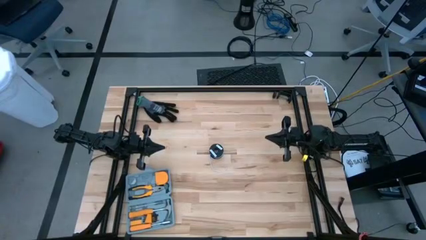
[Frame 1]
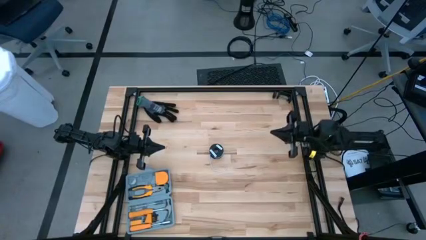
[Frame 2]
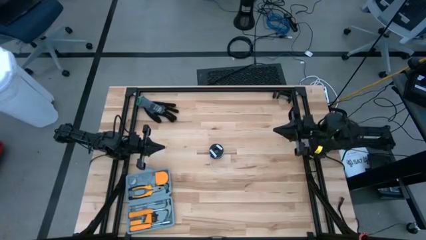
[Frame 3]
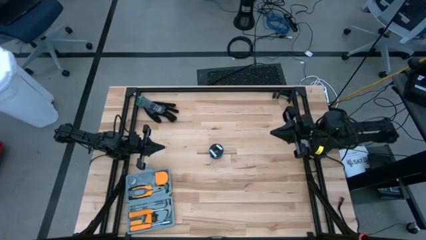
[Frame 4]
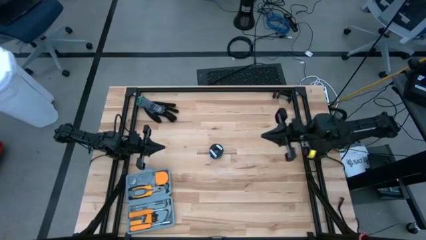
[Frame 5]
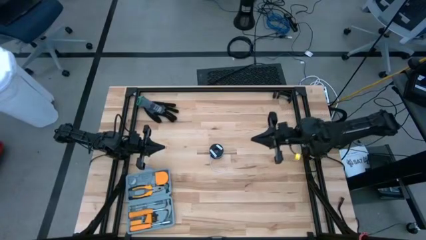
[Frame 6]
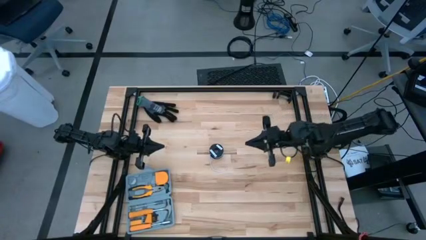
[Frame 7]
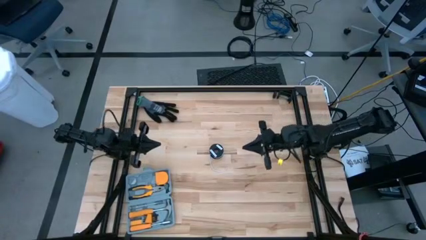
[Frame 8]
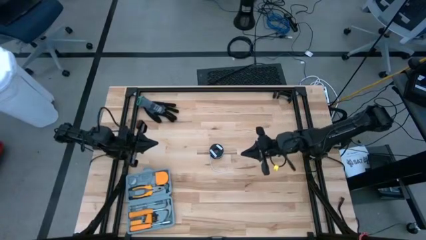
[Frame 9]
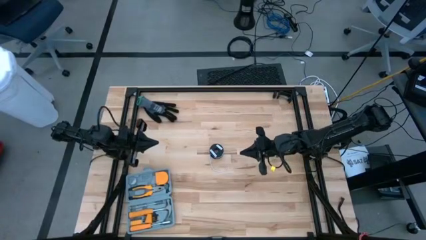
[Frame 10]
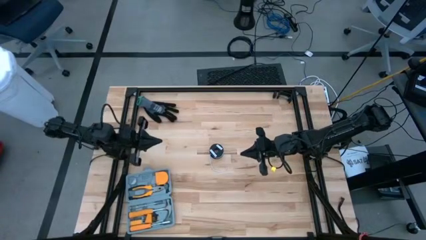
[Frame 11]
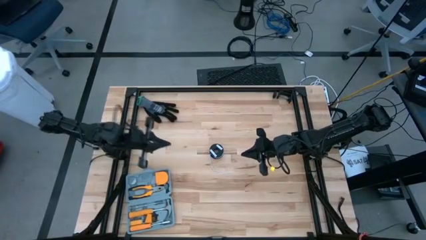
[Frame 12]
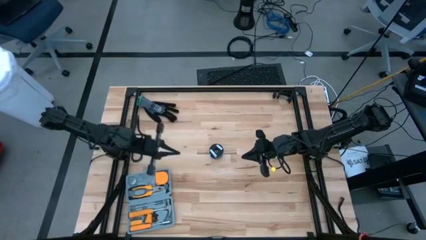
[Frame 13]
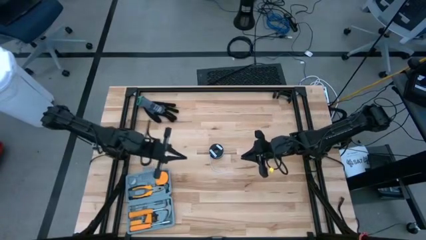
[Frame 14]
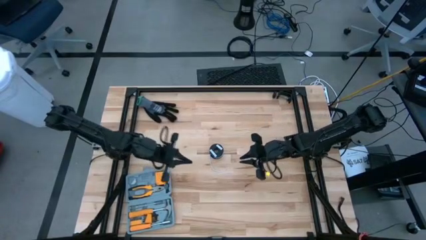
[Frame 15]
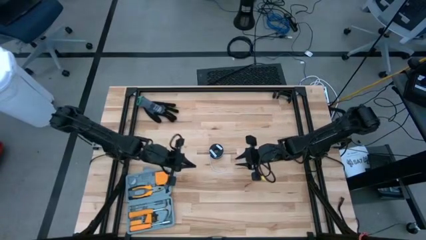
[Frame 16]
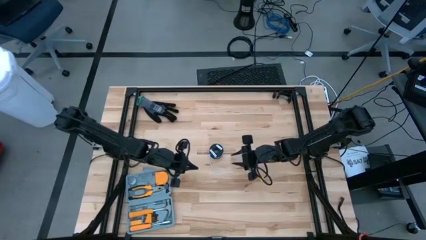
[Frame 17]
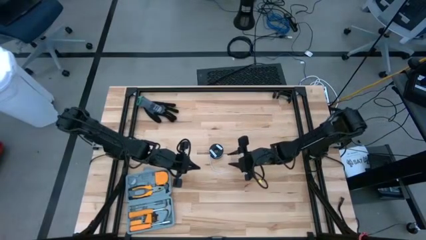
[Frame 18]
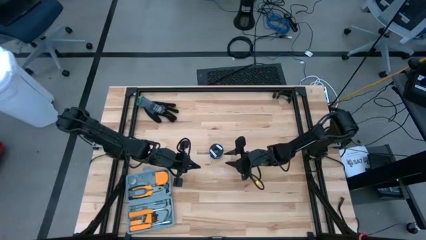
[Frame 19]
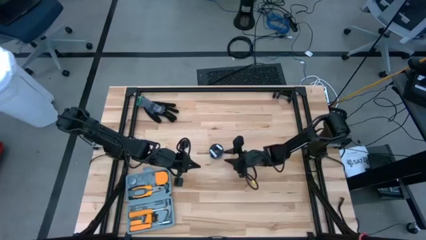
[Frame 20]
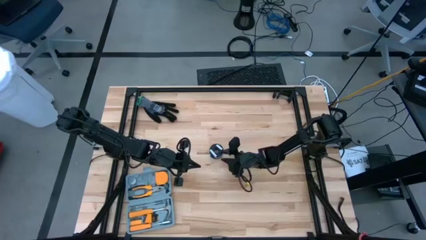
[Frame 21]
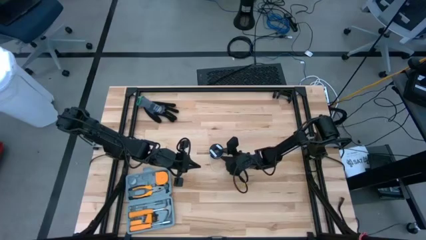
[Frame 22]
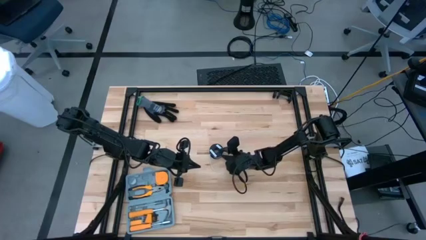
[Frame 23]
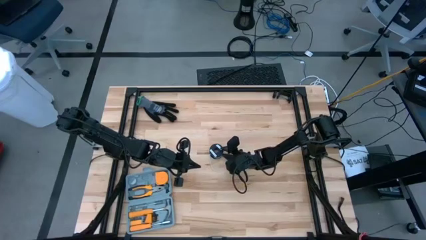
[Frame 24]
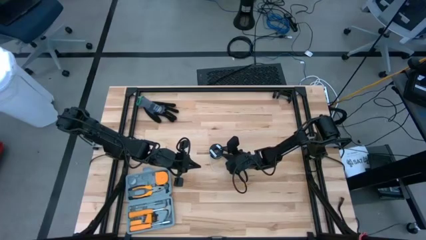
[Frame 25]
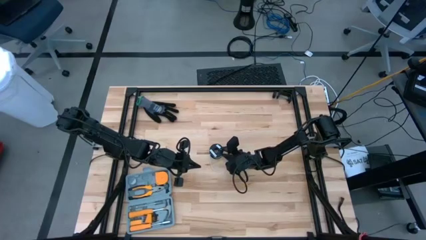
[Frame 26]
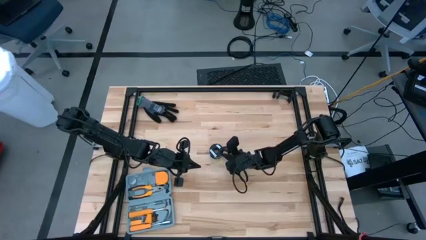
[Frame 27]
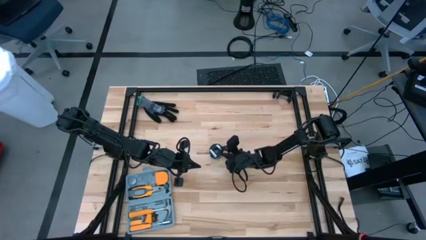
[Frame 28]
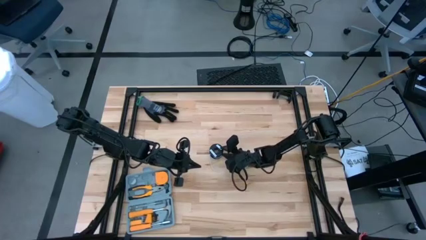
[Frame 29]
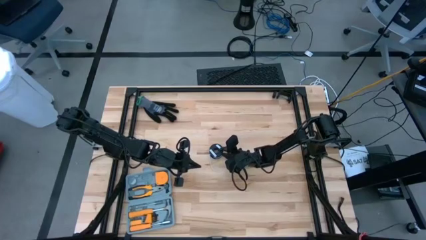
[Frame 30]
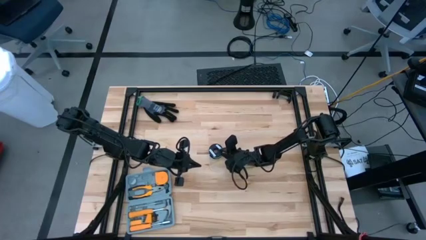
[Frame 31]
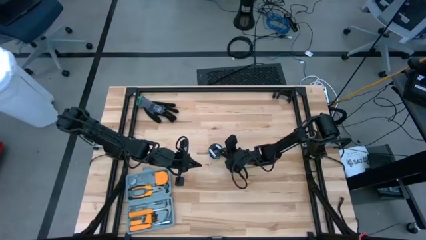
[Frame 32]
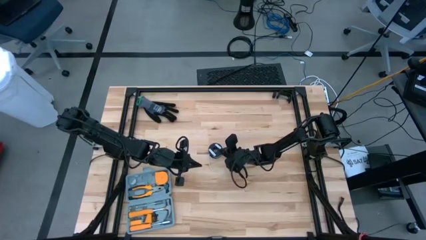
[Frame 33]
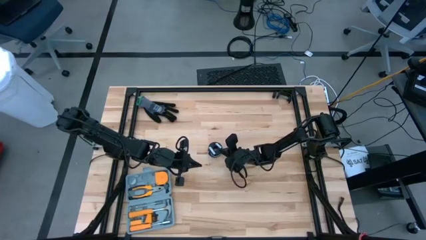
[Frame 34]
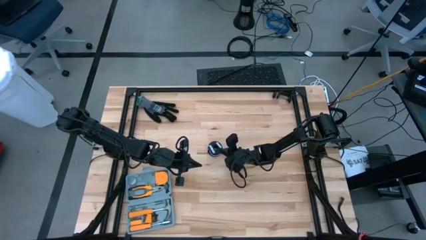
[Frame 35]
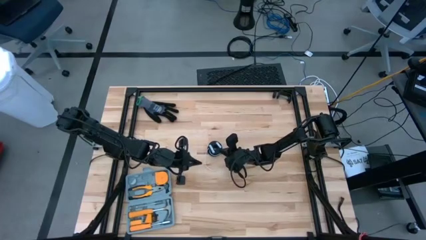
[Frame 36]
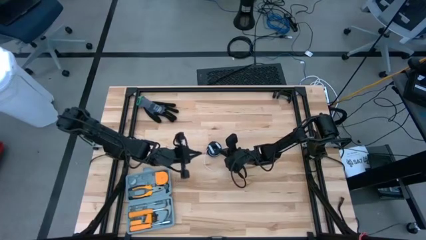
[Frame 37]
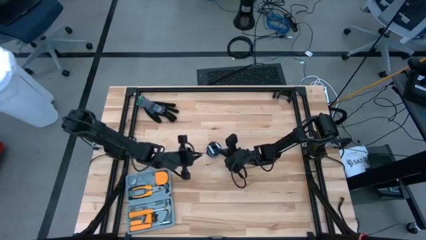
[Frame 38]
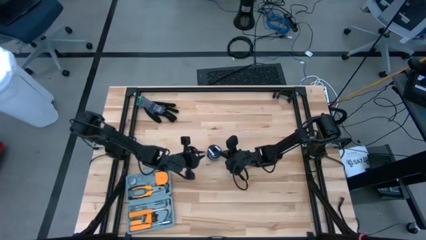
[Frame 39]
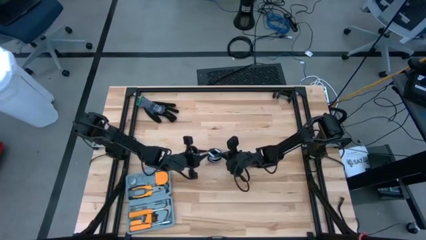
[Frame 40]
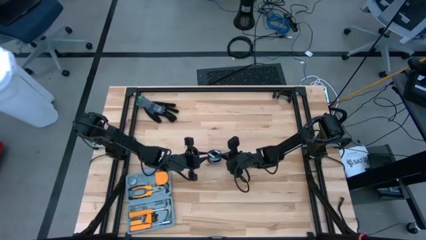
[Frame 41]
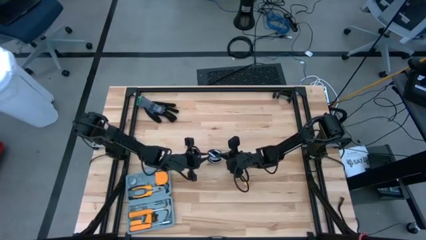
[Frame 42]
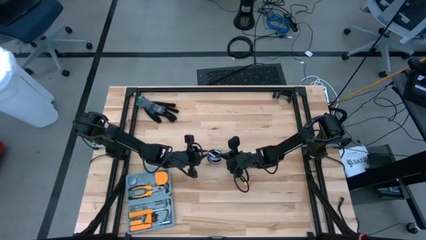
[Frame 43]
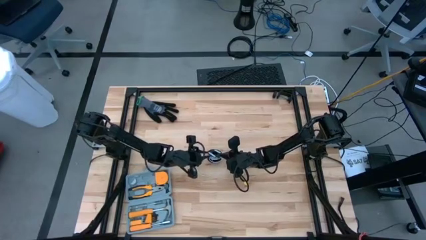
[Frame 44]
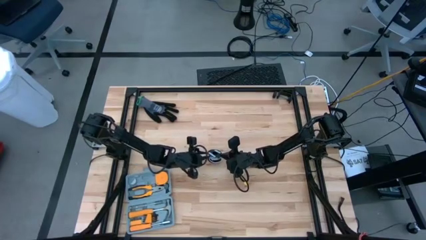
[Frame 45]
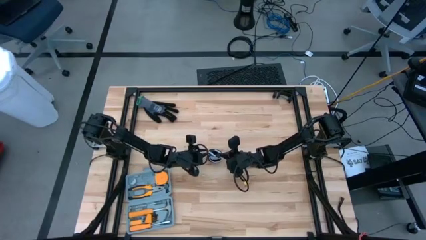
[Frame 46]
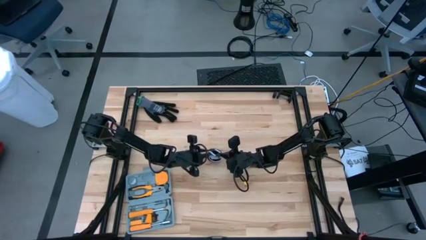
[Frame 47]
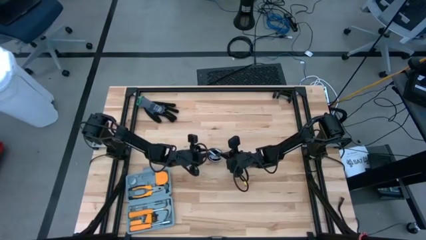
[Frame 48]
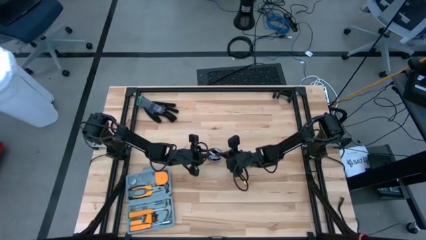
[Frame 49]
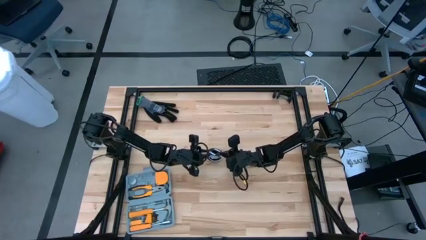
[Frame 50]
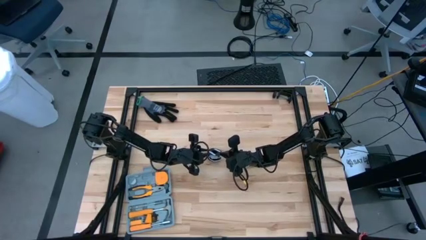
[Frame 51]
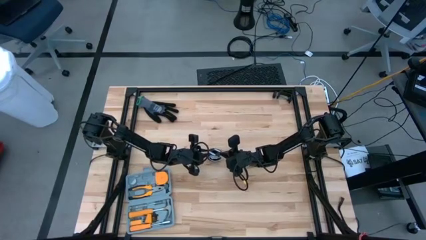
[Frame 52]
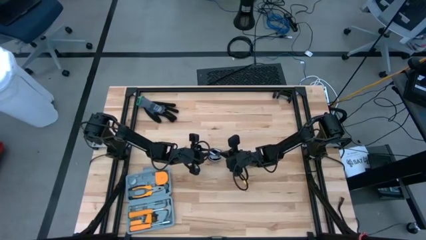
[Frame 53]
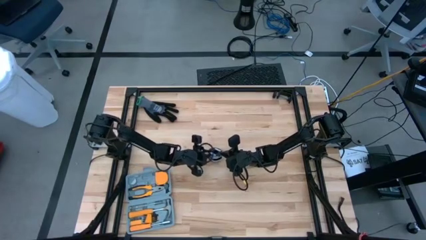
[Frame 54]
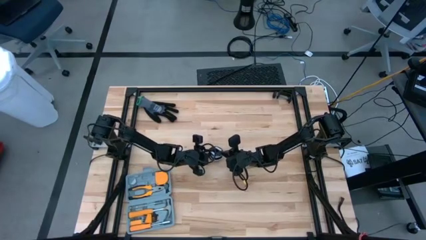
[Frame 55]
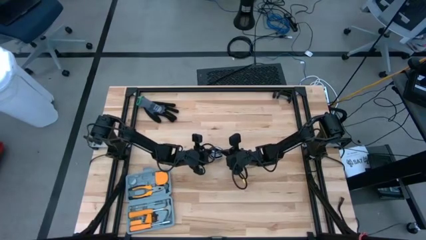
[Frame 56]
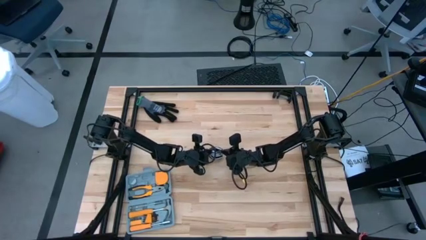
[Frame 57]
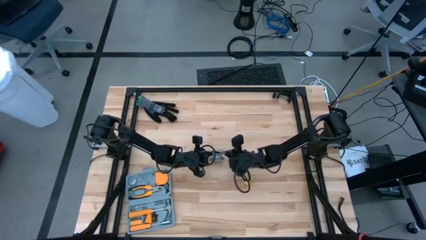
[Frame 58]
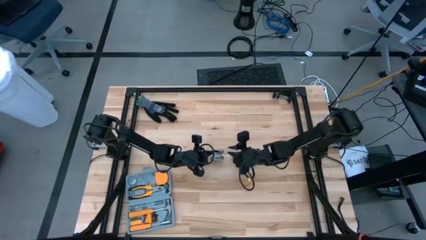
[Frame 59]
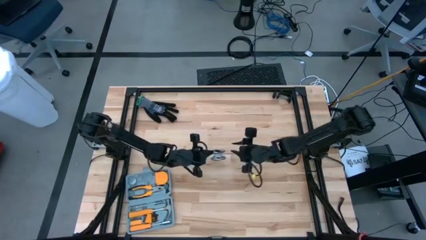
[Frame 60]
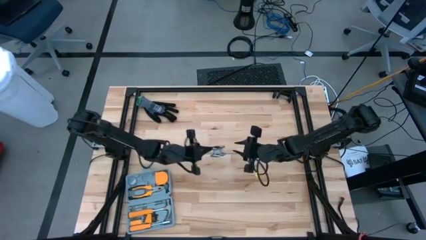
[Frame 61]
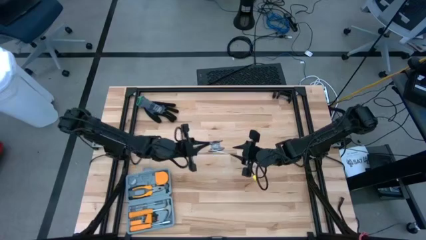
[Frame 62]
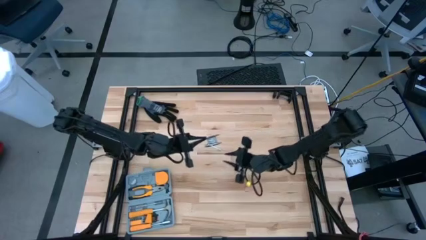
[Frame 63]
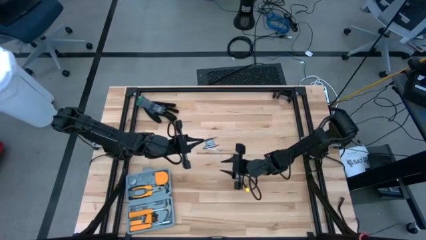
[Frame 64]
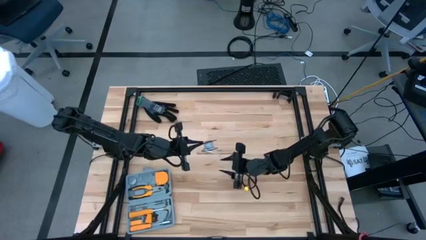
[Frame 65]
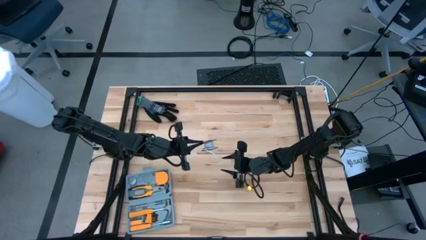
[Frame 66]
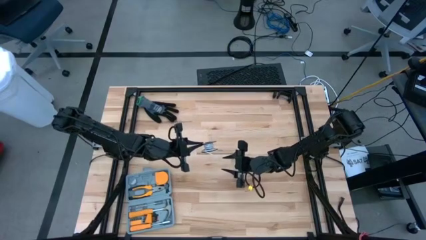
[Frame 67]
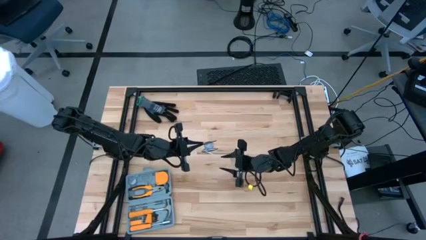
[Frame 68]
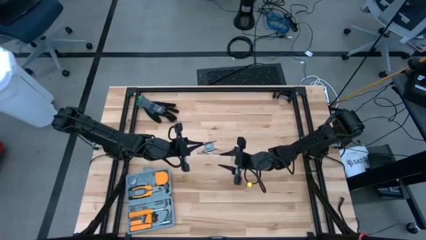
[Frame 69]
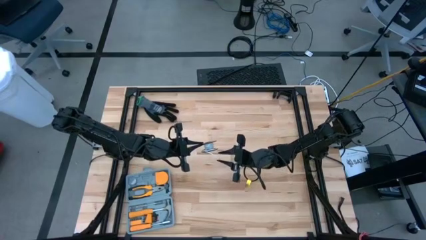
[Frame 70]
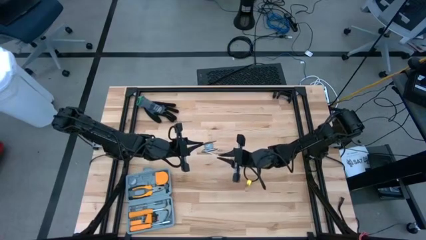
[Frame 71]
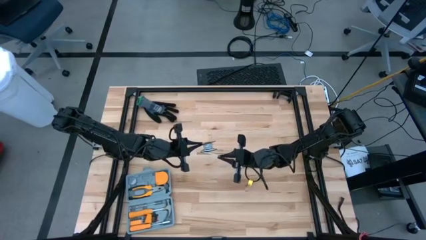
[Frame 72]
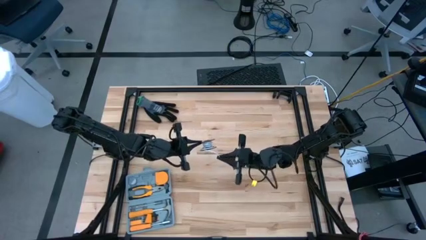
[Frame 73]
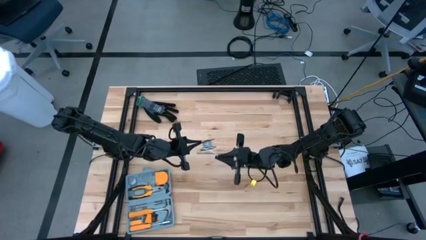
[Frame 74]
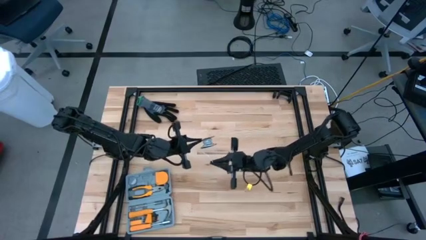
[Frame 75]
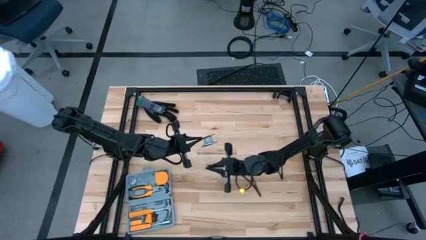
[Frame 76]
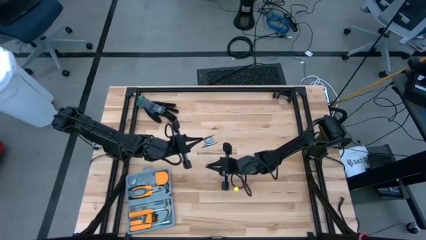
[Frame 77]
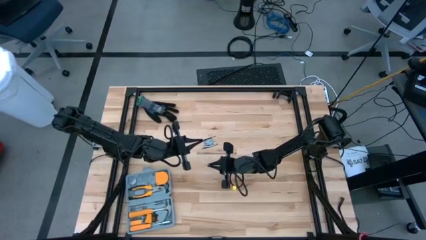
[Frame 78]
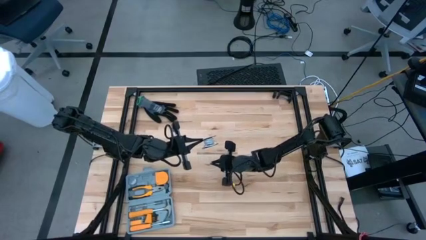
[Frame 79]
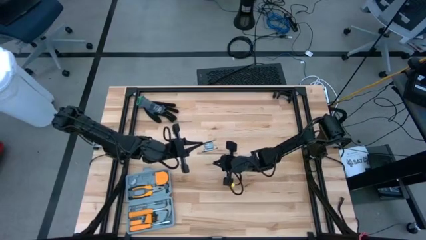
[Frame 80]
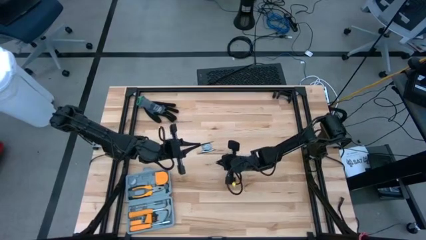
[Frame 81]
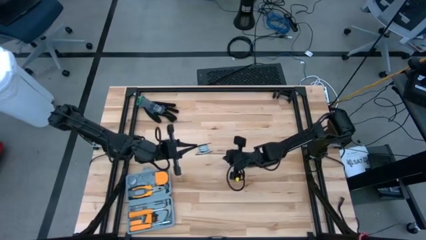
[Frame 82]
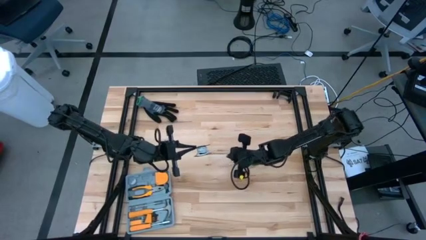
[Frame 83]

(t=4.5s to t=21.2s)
Task: Coil cords
Uncoil the white cable wire from the spool
